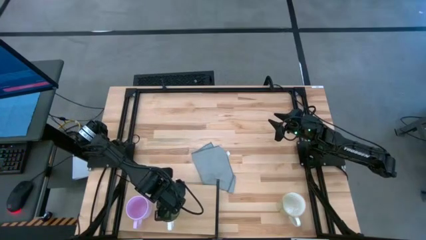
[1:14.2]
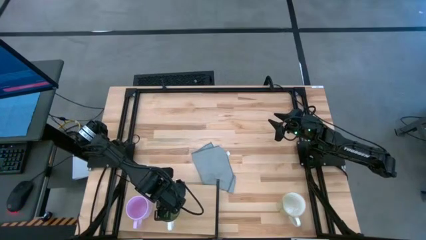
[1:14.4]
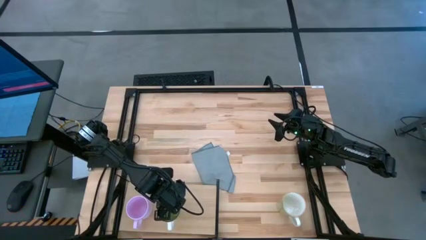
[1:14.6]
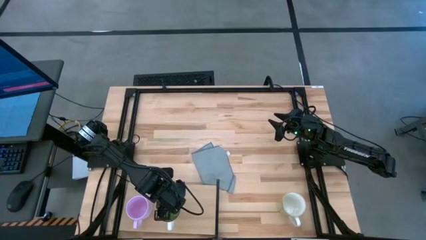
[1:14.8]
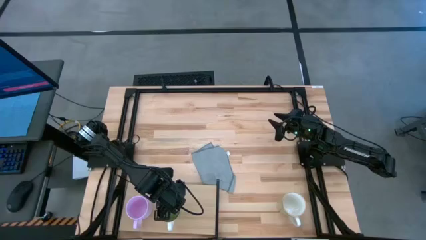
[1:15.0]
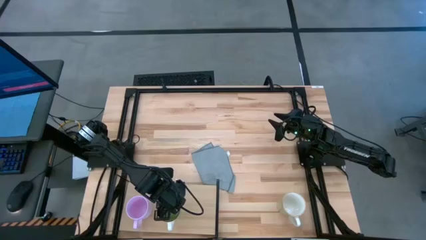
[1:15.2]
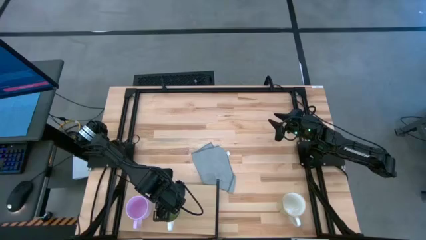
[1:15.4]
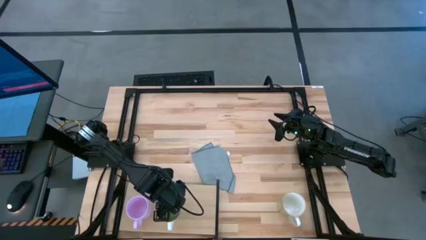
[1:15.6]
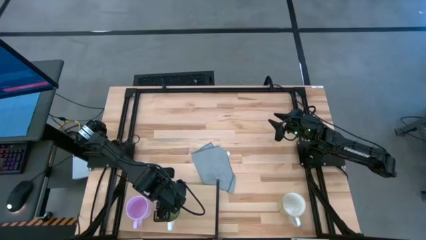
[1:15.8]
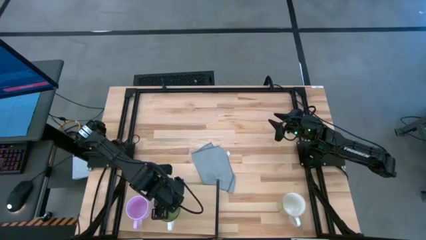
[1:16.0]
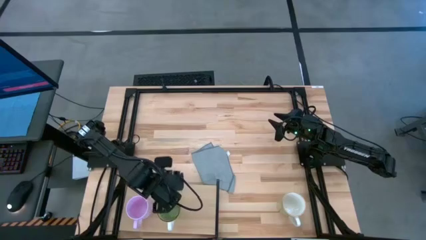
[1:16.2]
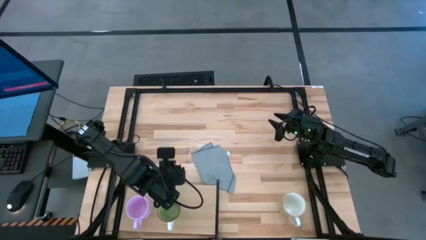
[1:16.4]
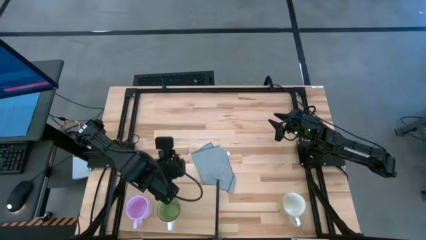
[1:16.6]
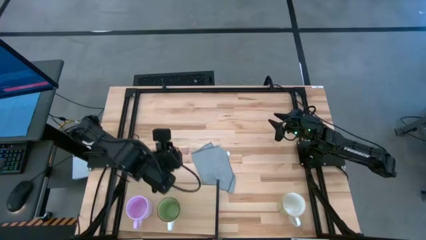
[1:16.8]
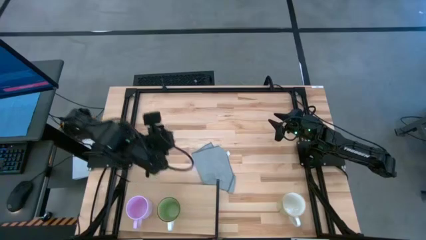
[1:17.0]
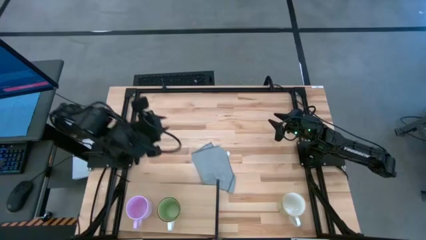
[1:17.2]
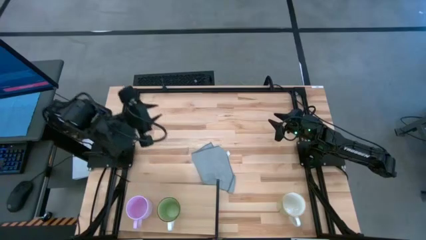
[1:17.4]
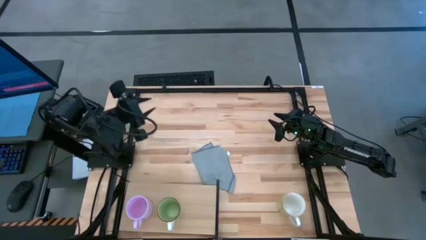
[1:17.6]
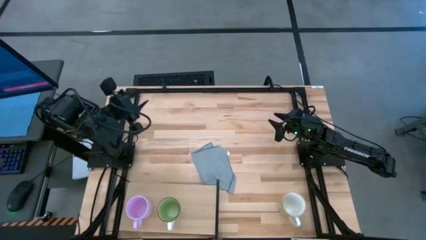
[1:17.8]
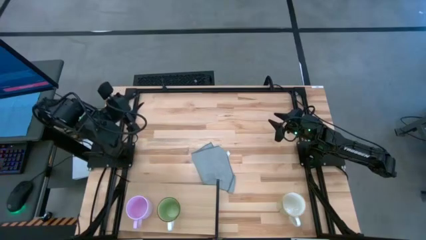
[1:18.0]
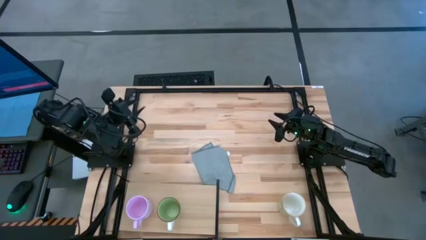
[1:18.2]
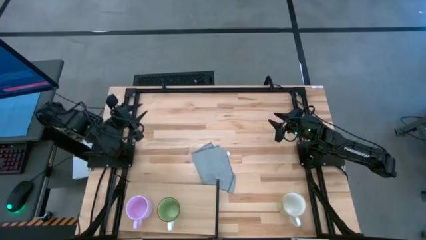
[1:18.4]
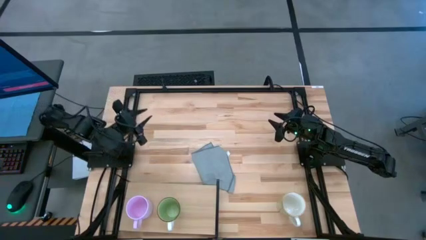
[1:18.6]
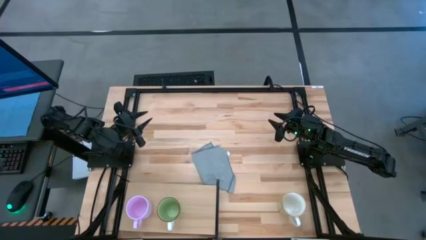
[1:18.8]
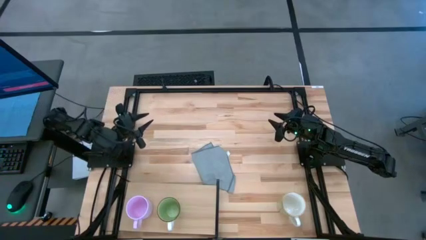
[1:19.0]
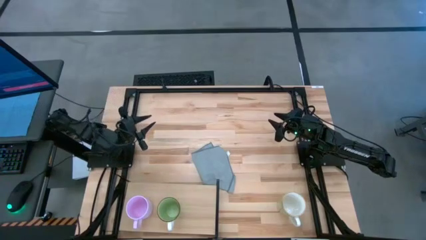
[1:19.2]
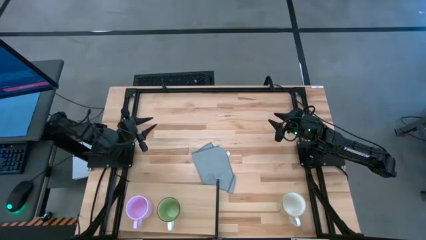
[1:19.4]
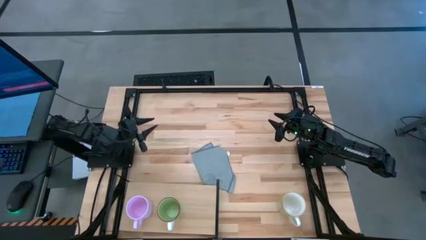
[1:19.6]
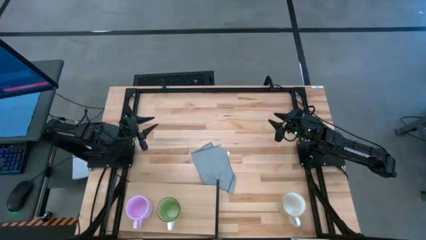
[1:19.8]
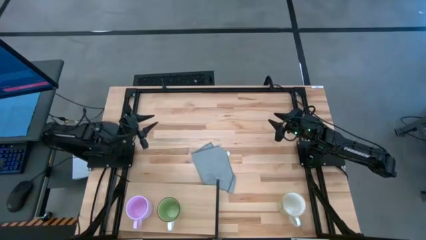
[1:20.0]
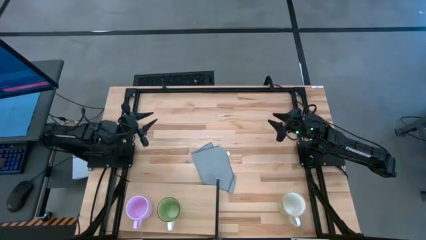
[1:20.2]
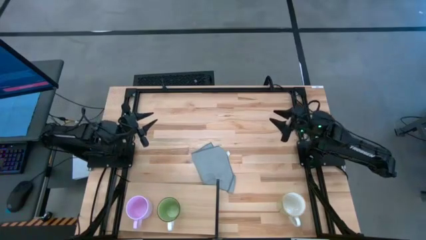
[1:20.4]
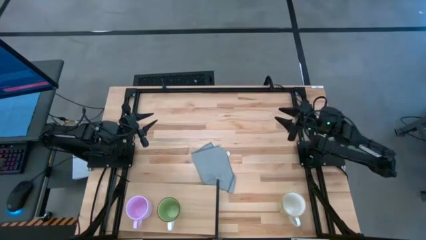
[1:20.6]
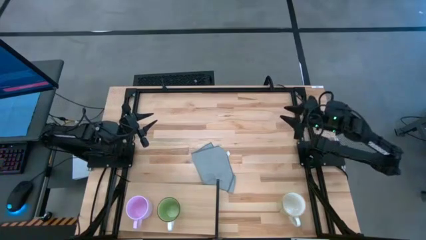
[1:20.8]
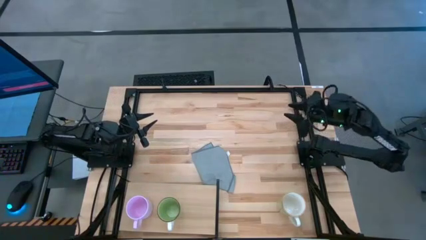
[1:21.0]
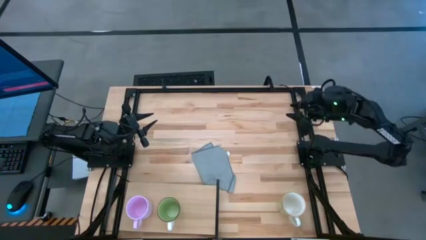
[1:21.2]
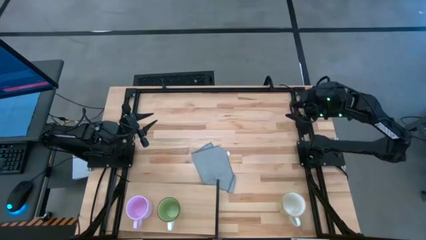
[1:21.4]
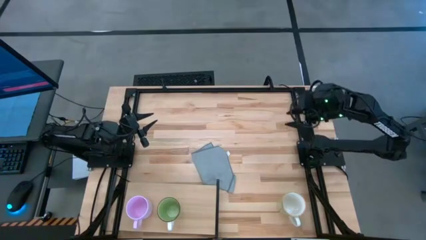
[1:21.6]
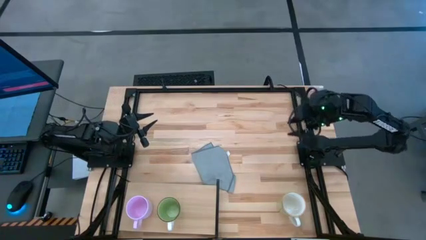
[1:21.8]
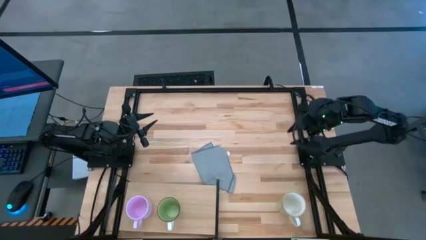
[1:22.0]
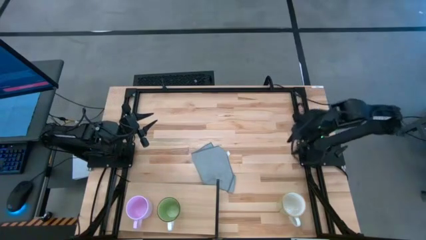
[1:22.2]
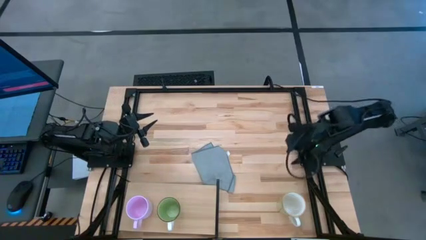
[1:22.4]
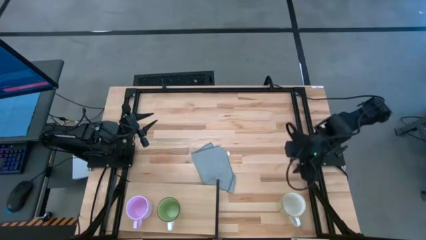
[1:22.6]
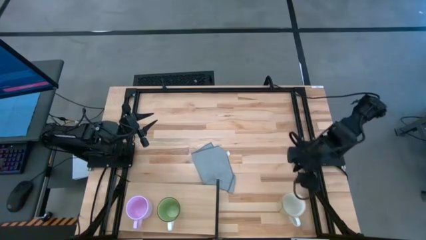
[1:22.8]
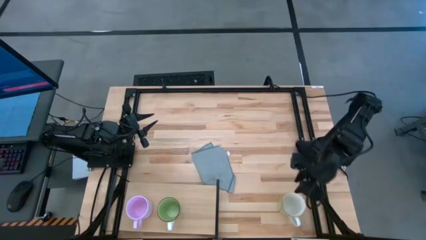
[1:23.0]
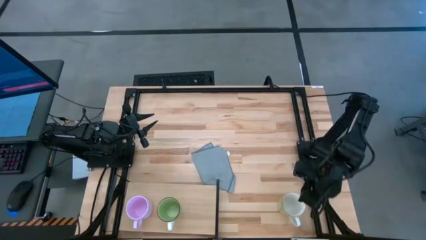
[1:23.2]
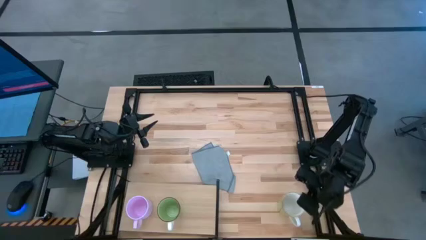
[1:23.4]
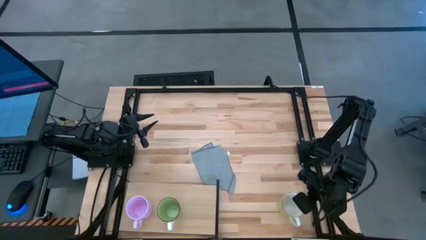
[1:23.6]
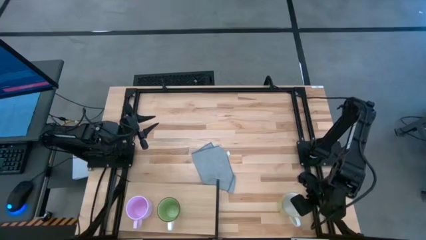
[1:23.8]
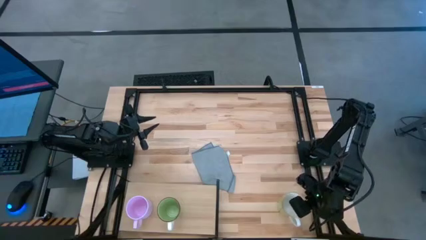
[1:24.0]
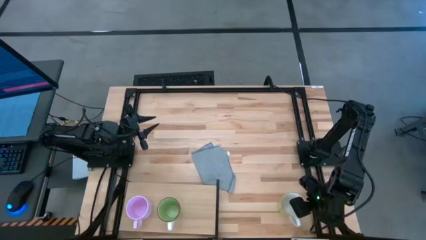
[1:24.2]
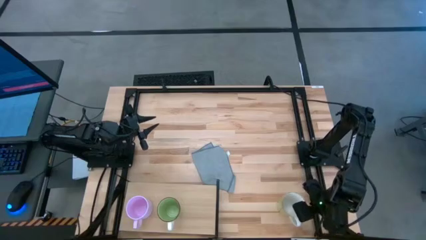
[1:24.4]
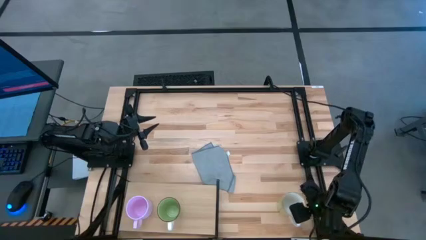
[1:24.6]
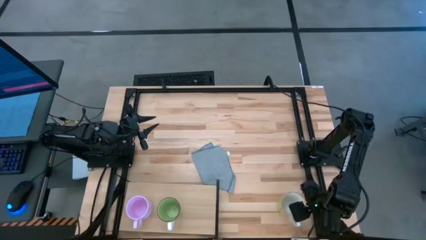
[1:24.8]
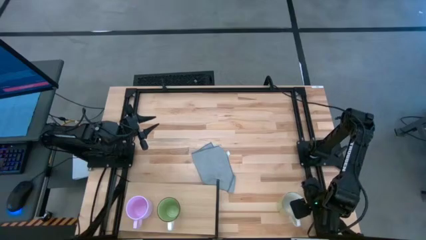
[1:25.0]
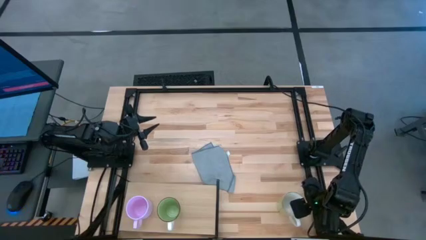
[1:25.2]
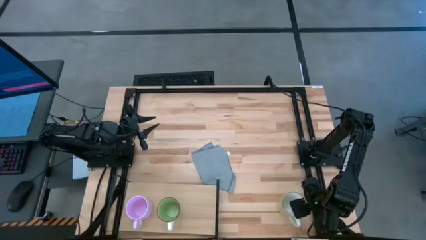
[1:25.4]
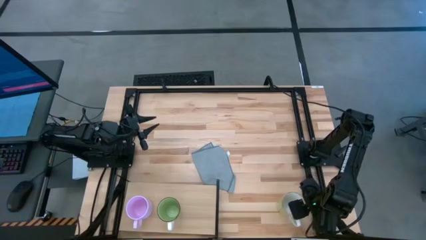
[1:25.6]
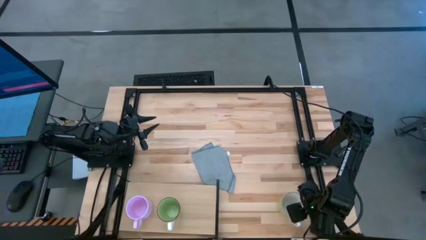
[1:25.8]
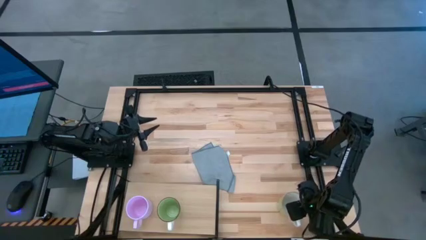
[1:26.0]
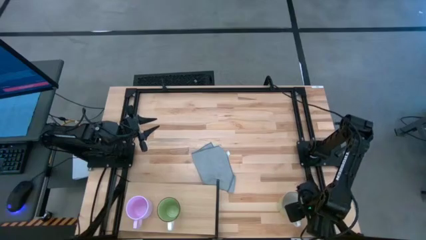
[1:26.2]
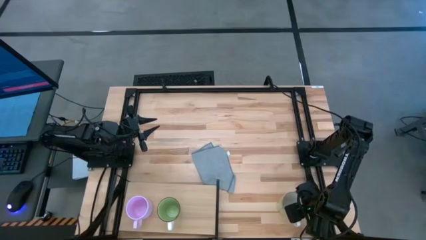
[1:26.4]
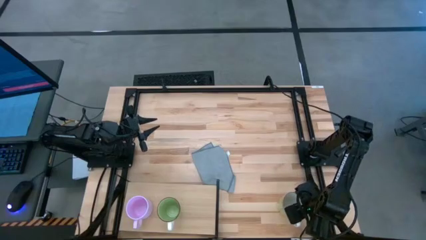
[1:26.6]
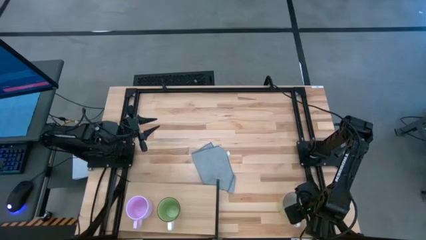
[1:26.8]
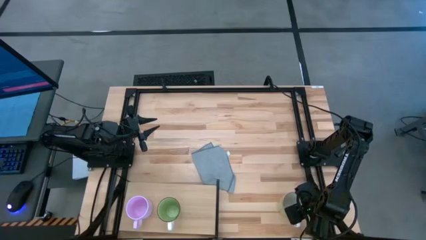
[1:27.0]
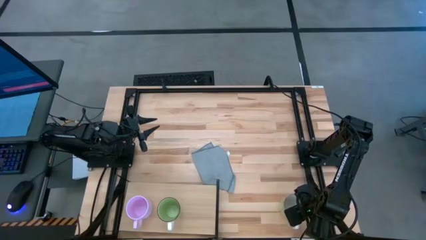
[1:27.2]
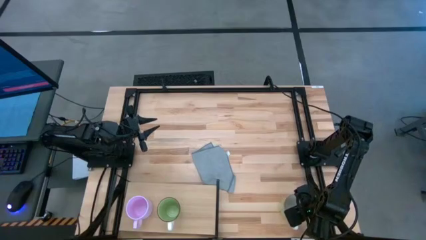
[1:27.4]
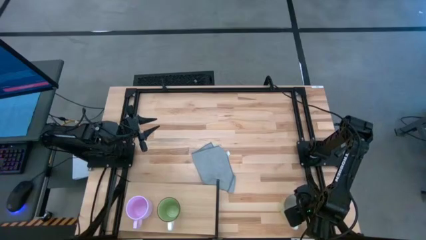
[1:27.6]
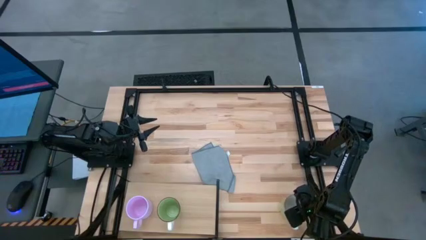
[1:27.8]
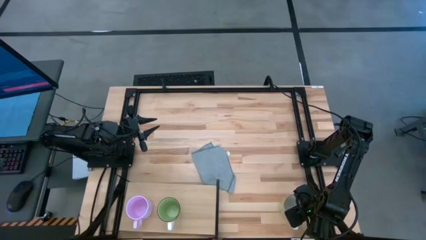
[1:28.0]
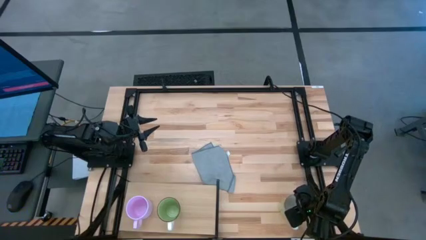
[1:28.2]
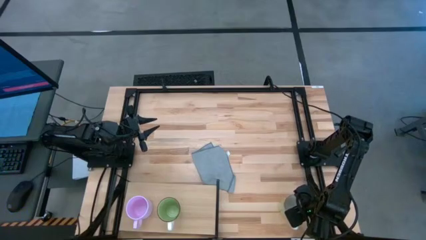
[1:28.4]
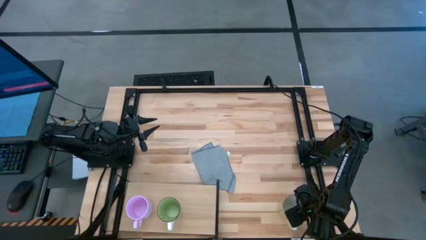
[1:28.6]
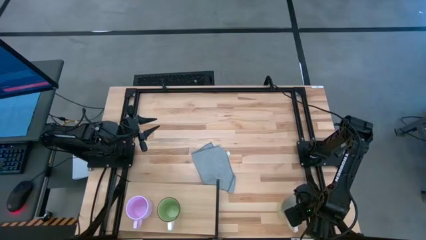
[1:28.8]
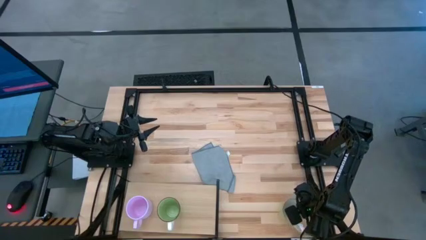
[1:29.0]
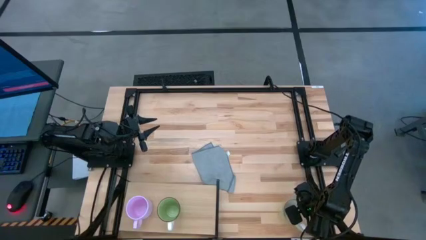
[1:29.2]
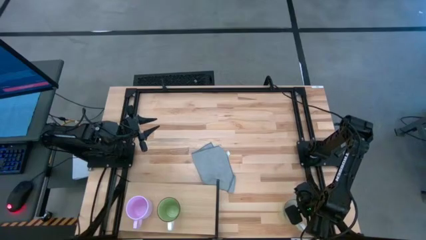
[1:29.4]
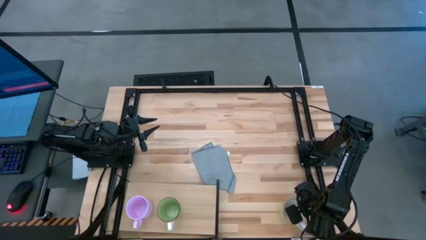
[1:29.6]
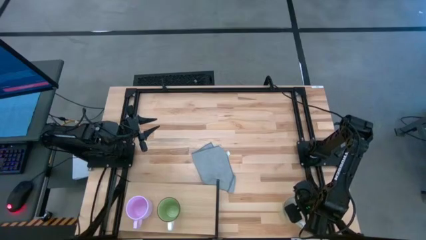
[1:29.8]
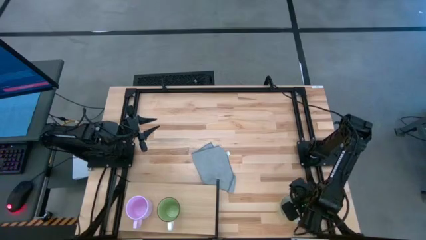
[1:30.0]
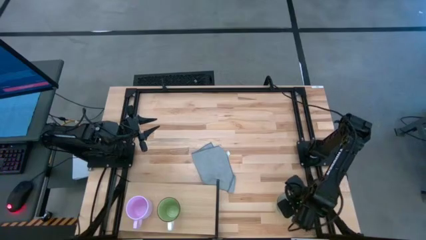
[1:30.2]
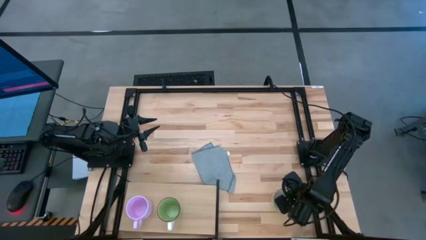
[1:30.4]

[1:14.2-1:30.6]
Task: Stack small to large cups/mugs on shelf
Put the white mug onto the shelf
